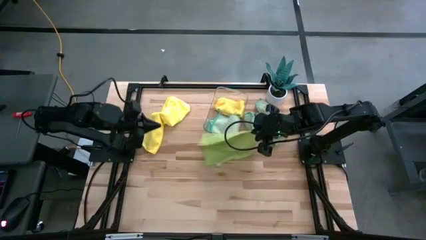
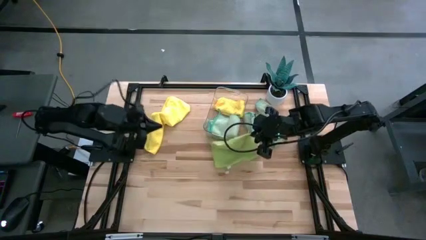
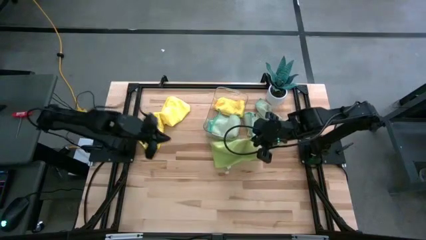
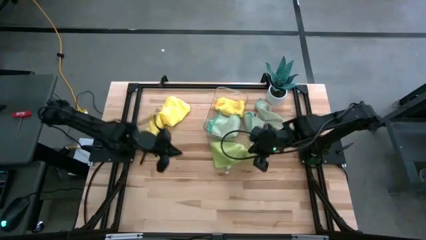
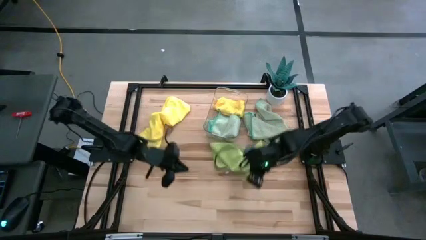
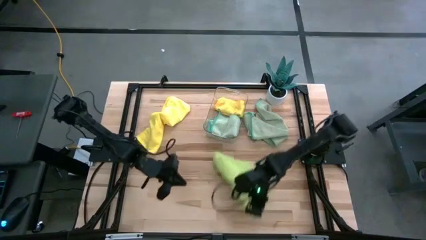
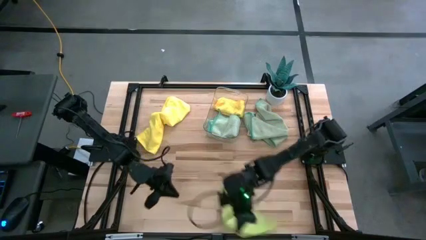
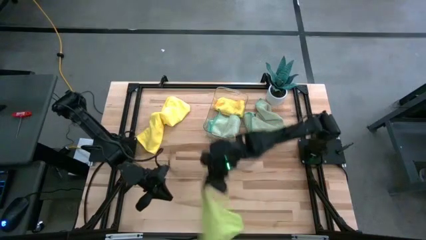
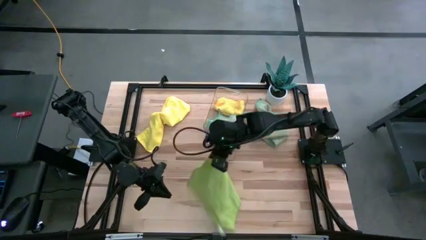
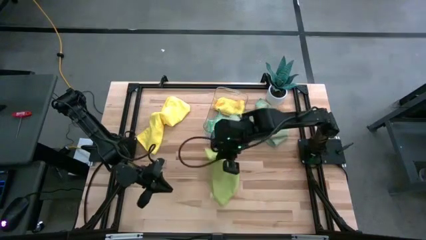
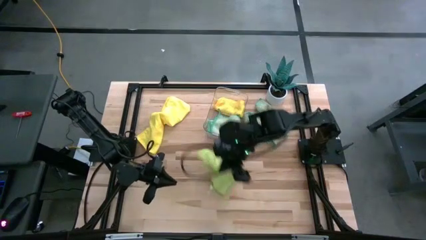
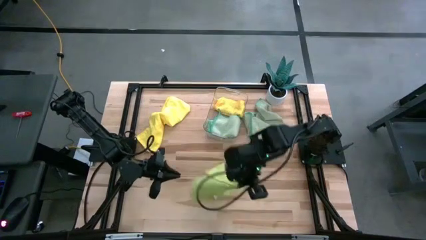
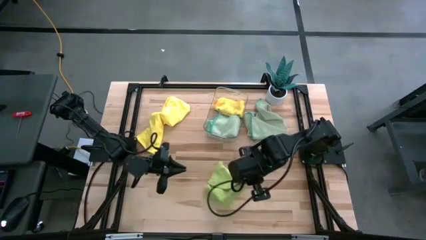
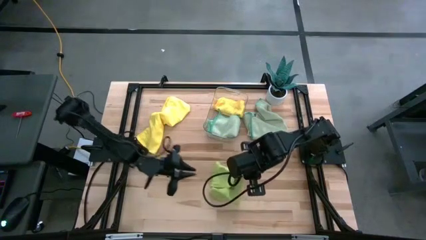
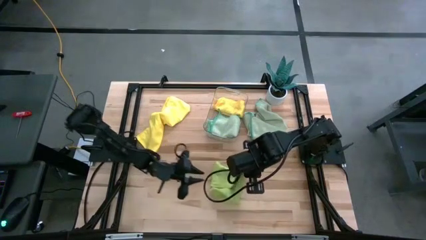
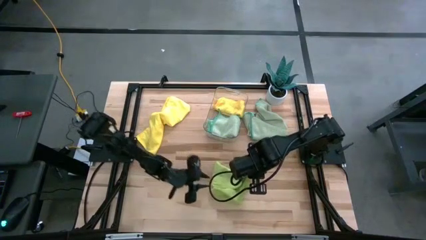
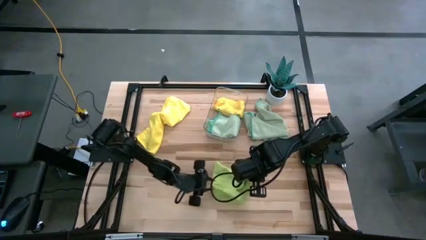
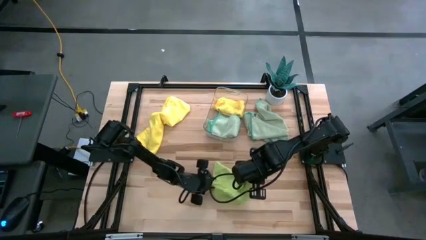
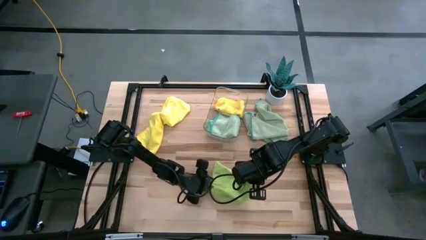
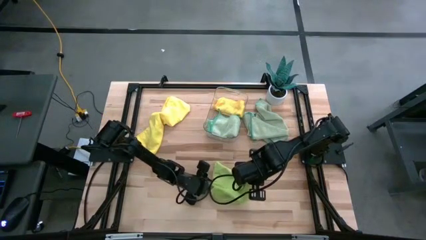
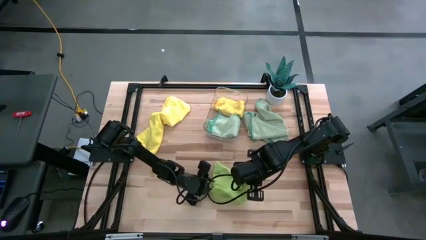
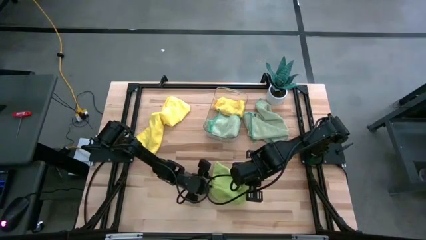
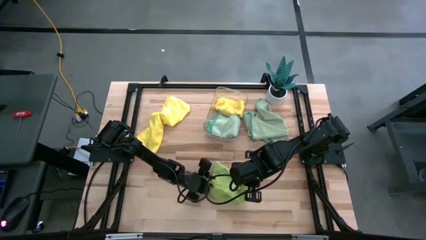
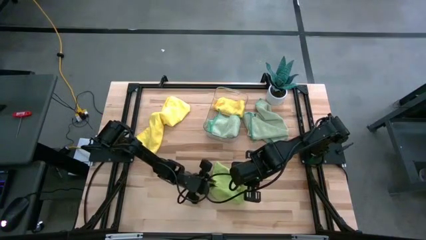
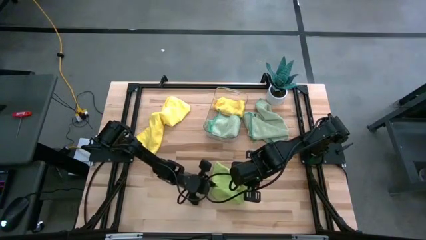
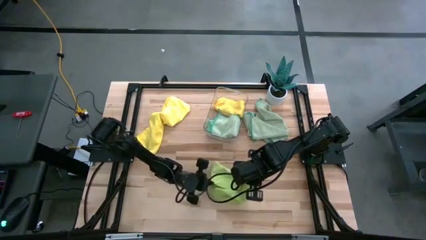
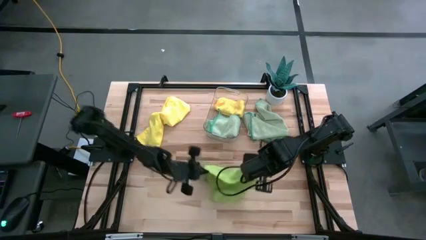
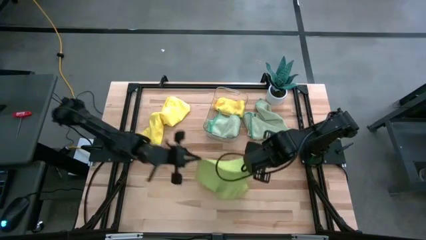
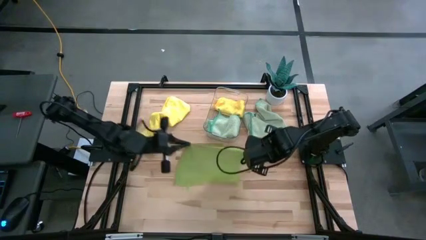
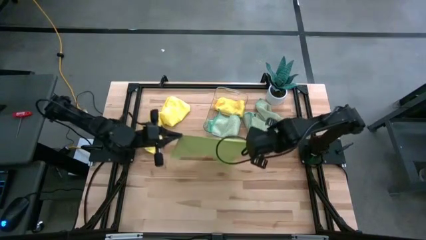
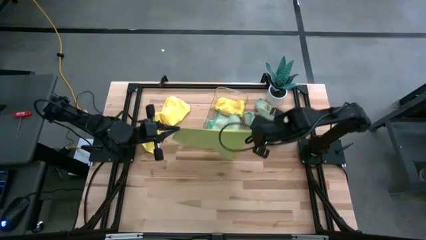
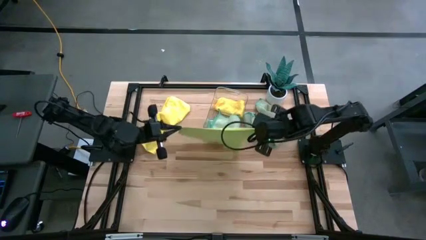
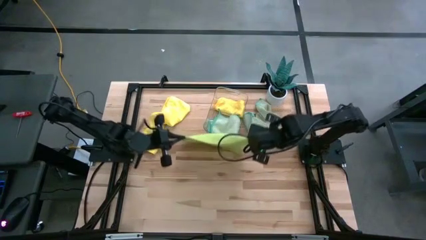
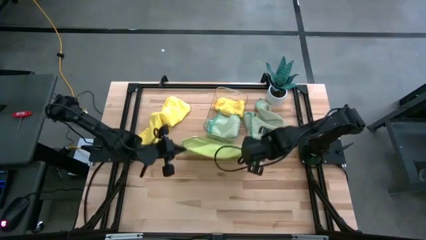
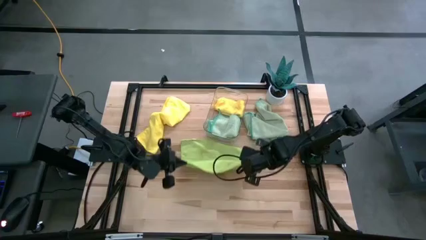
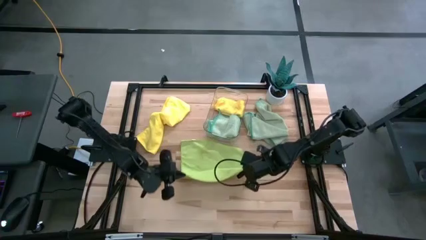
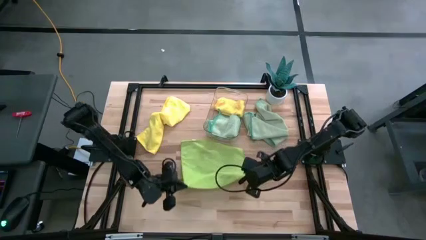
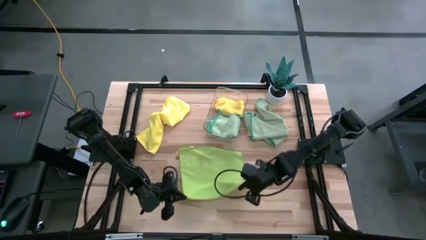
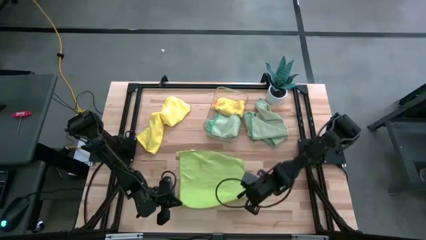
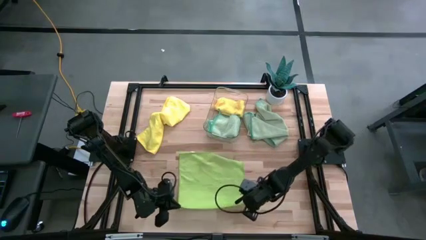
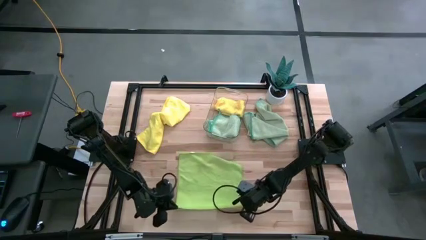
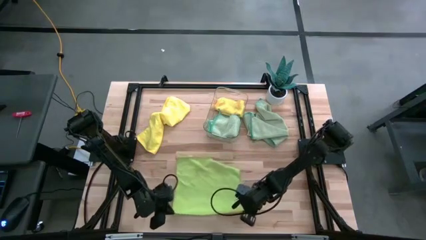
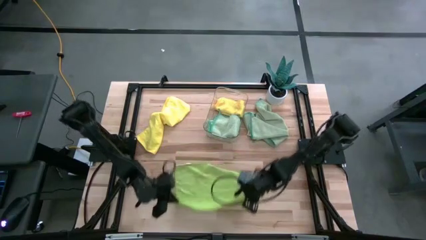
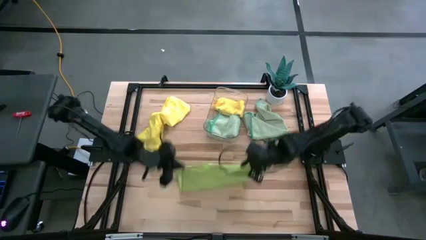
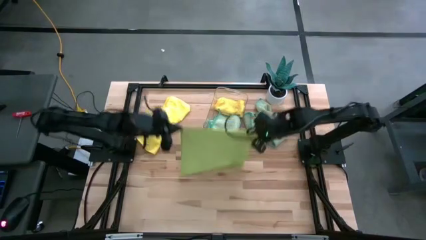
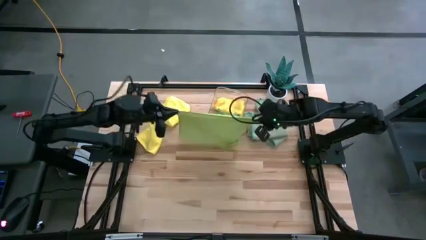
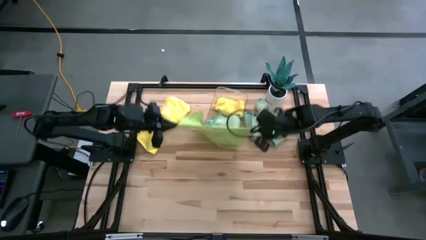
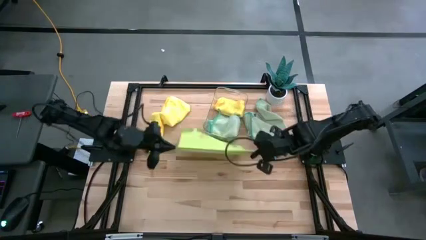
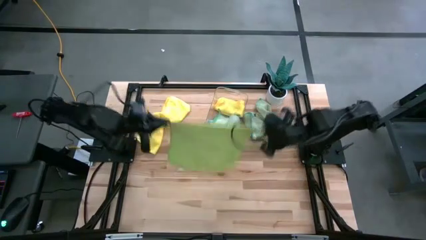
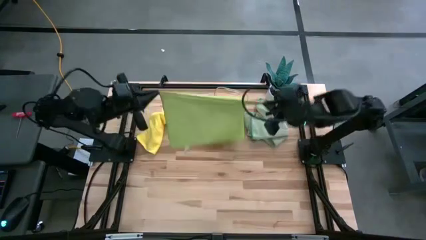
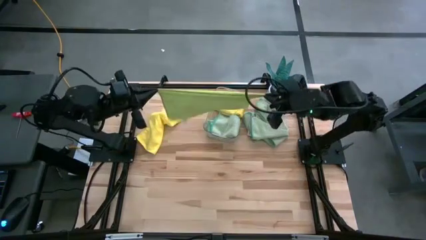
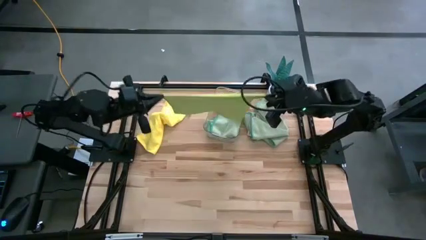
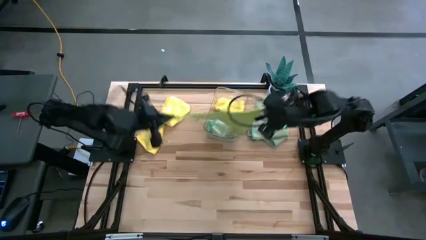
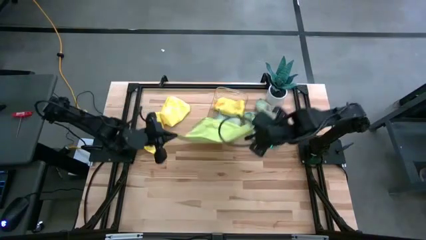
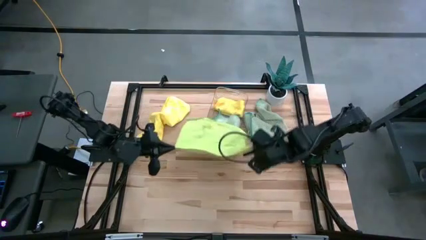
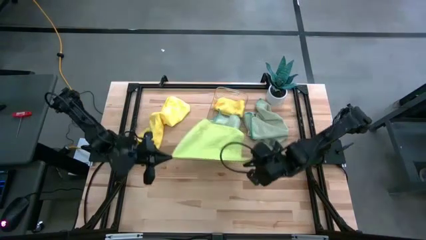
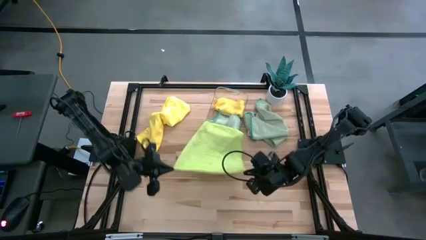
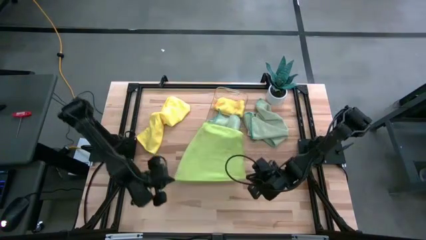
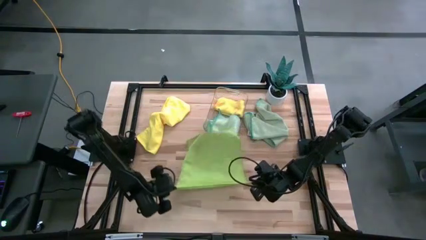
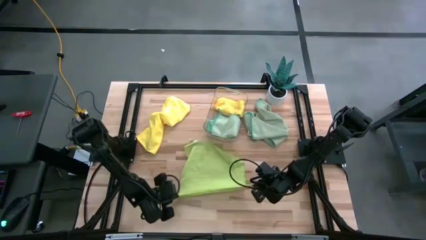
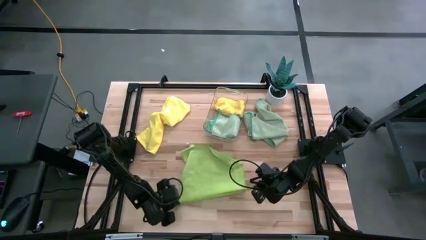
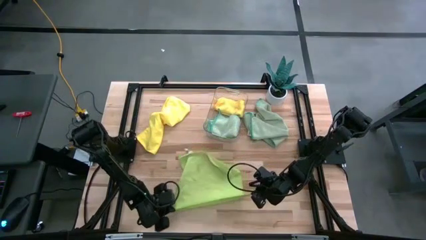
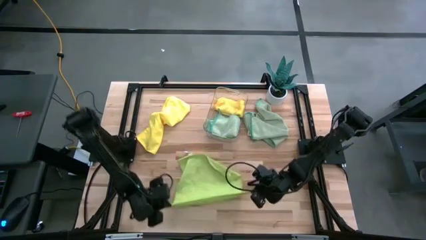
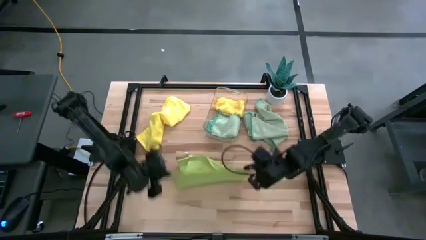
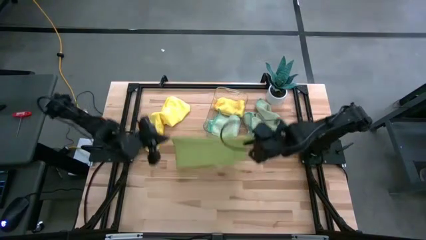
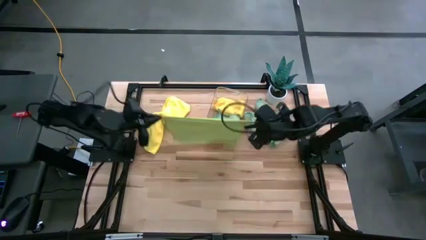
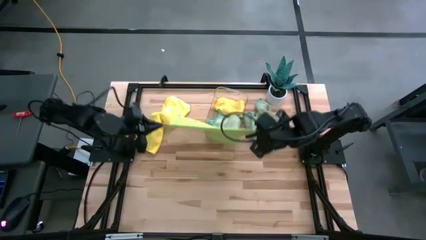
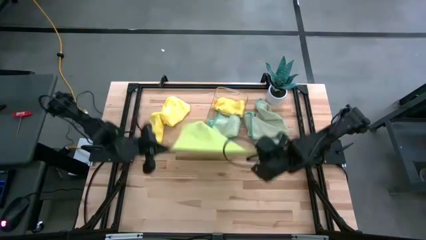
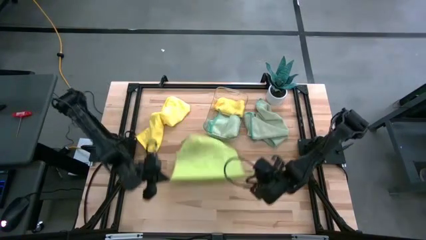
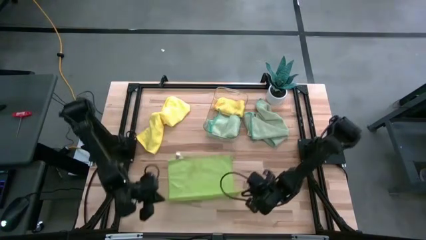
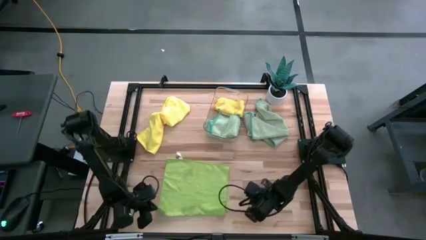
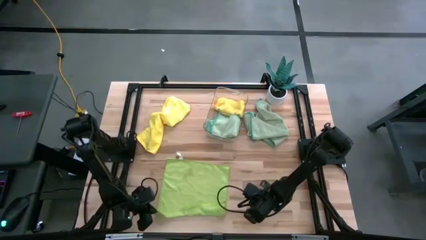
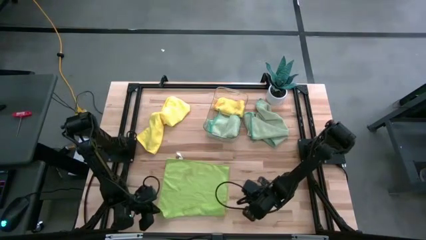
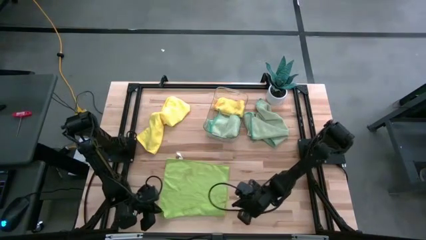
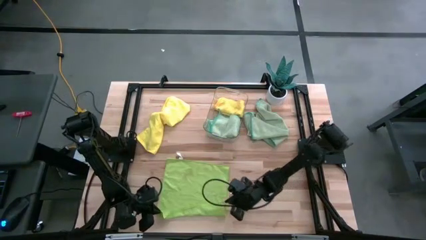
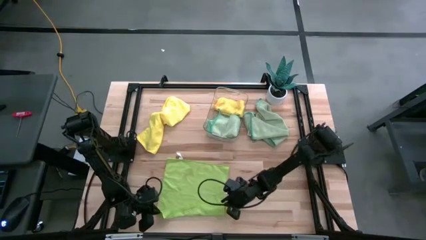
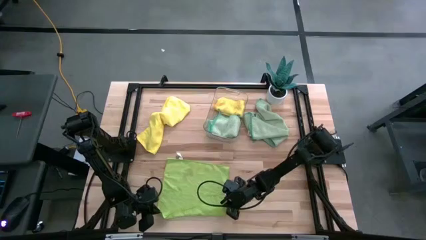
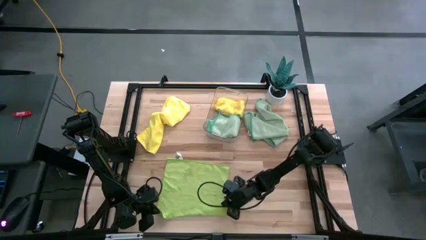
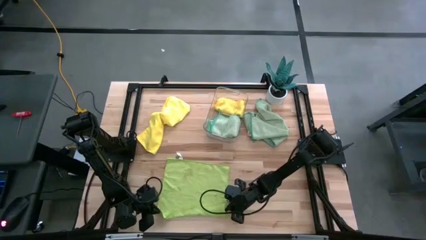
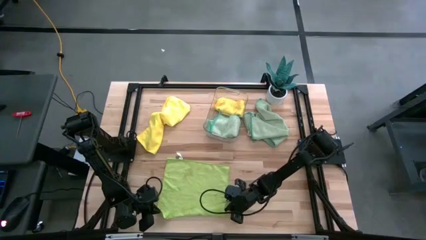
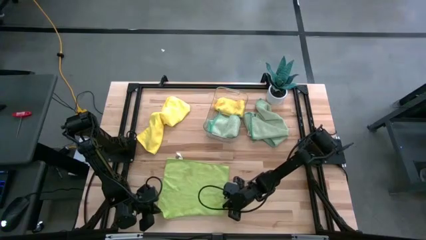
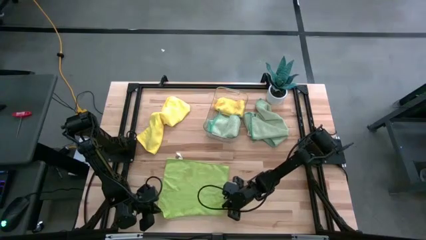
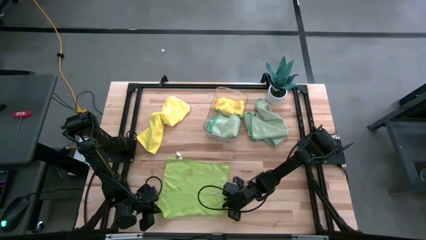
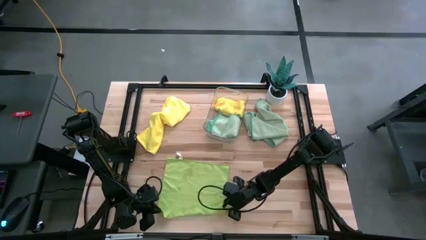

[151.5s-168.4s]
Task: Fold microfiber towels
Fold the green towel
